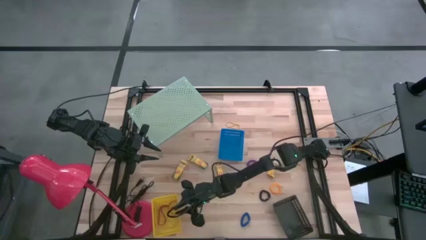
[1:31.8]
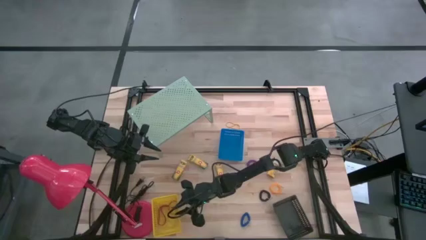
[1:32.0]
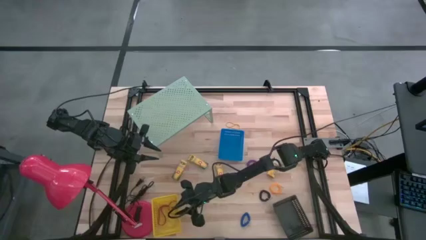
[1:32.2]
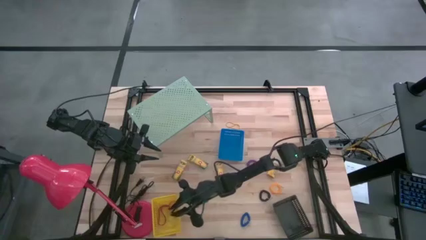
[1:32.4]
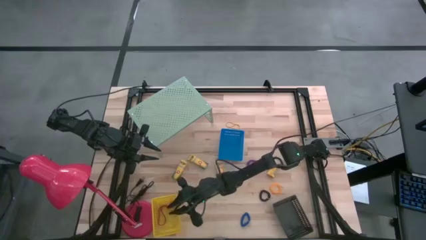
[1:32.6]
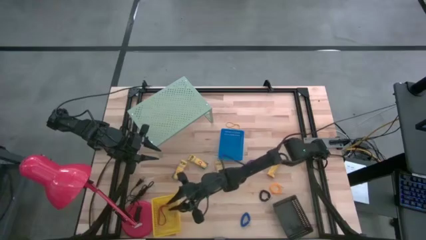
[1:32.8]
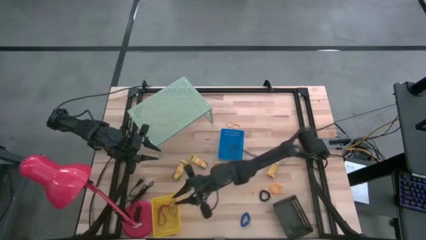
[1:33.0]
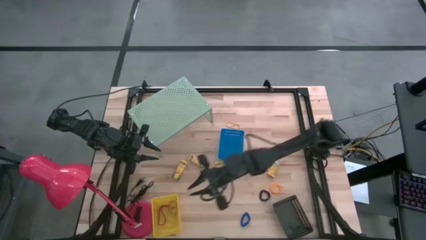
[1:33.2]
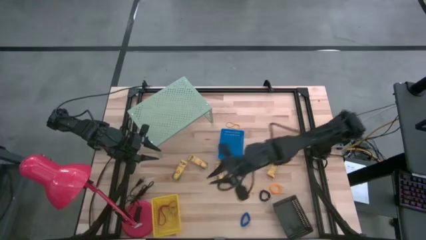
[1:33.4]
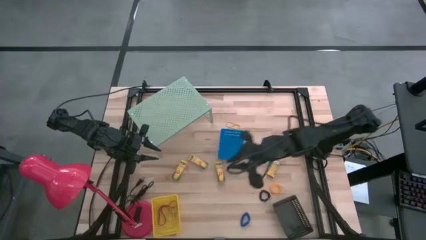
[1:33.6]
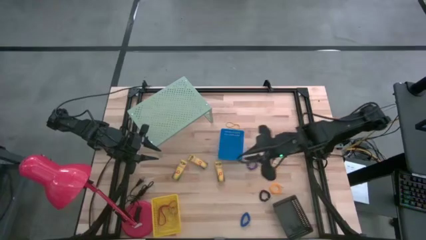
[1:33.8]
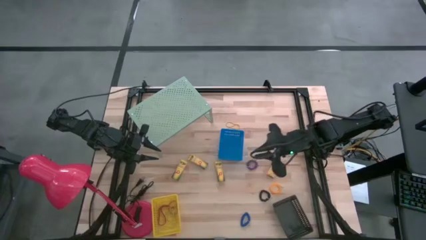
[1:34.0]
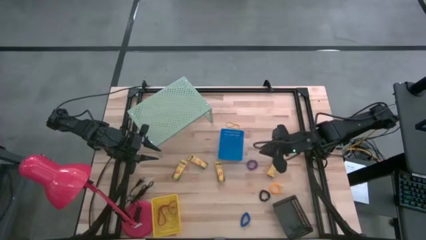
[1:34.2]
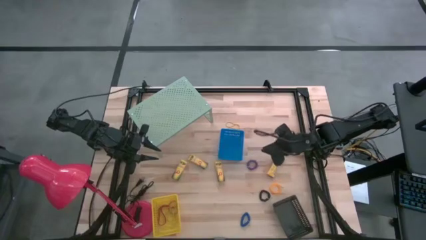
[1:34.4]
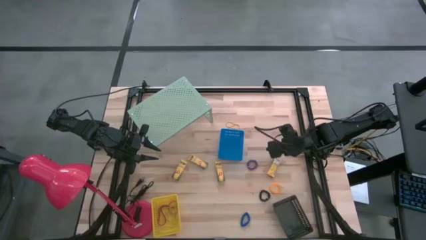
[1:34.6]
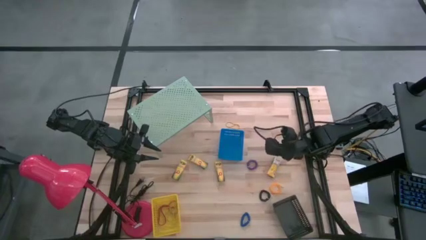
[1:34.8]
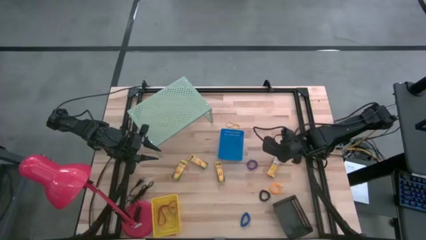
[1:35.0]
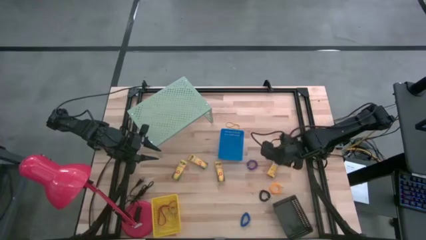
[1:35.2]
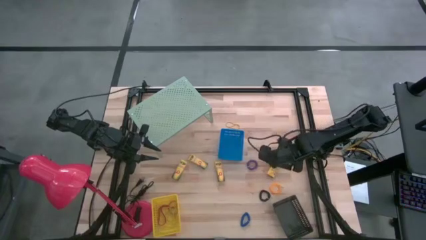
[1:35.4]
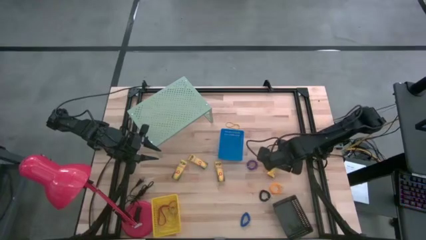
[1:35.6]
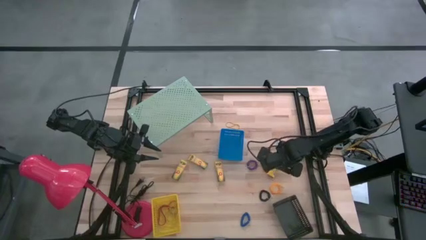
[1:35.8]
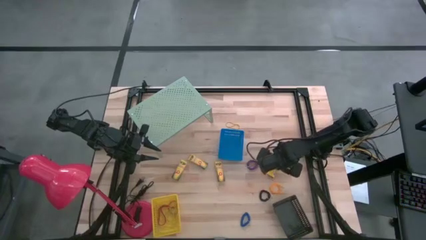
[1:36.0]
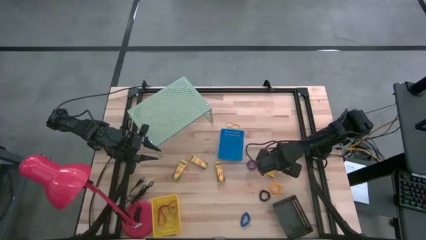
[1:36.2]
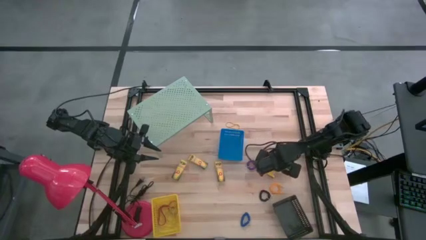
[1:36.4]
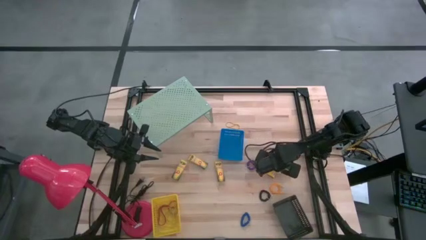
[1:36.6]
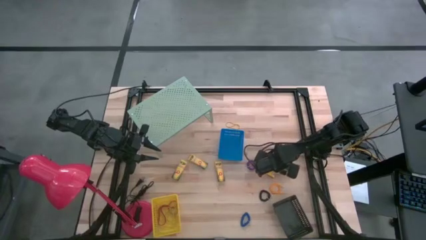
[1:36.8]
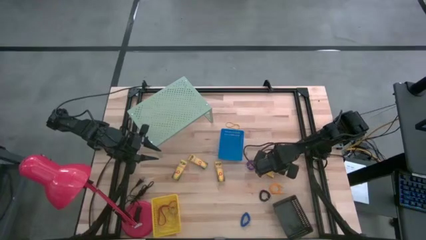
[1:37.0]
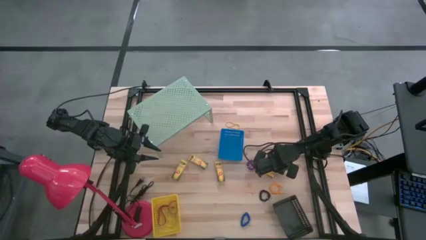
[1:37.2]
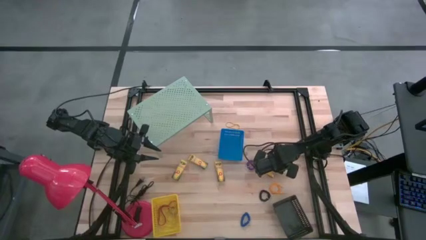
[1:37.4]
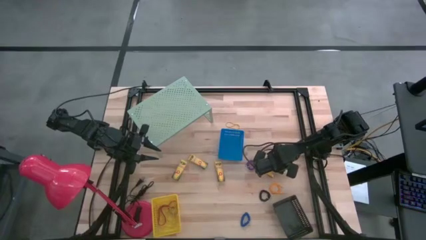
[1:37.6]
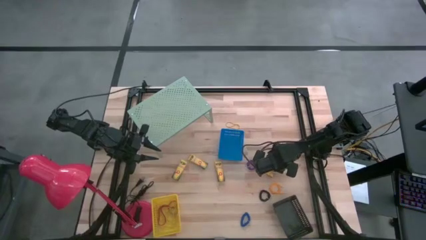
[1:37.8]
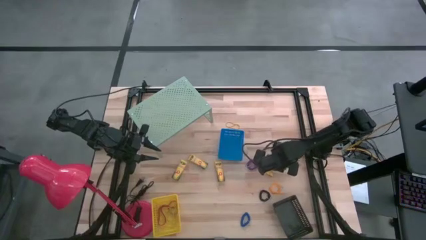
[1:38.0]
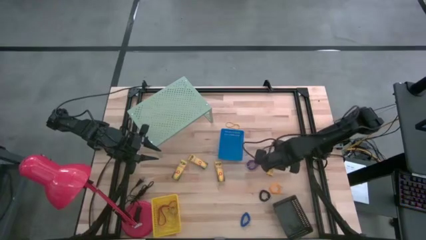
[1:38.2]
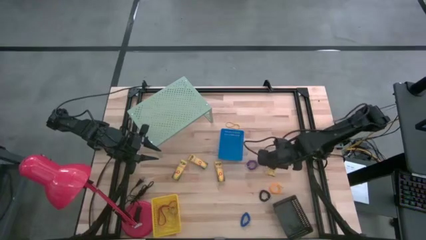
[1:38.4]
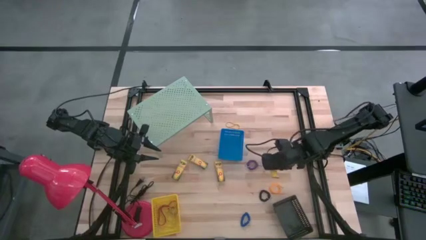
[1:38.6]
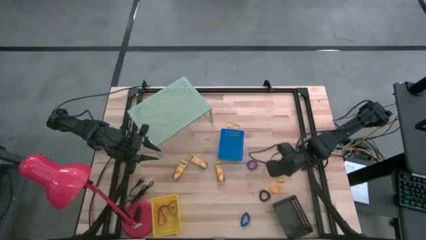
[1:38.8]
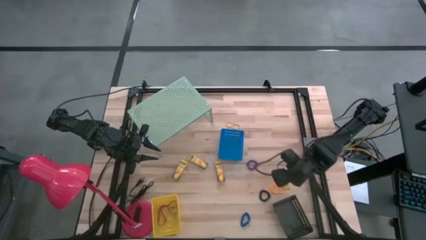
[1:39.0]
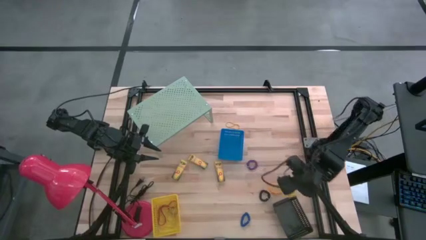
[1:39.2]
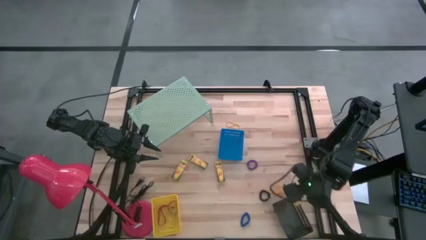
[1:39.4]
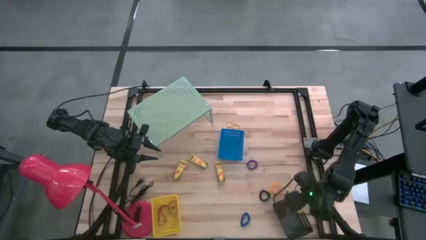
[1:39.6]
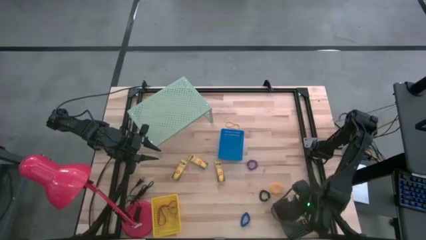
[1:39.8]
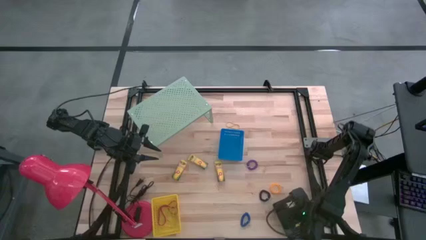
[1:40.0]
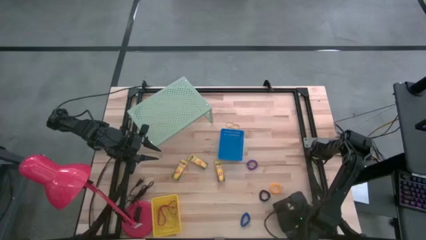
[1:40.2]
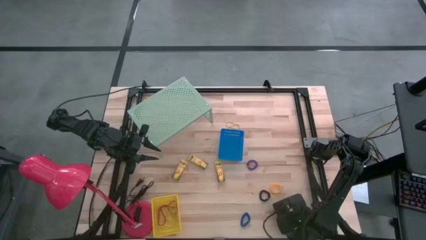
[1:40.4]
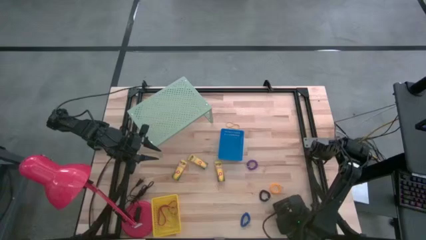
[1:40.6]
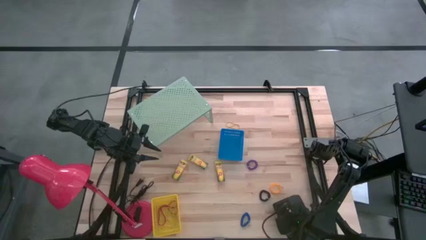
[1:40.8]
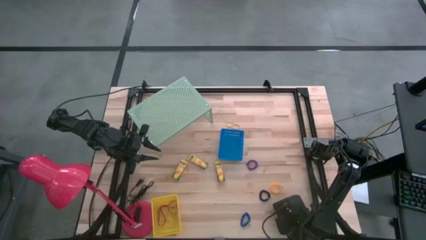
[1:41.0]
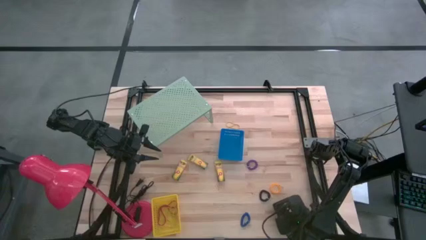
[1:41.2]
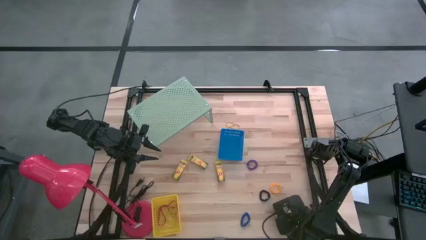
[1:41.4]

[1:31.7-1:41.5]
Task: Pick & Place Office Desk Supplies
Put the crayon box into the black basket

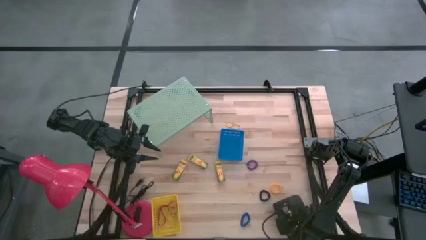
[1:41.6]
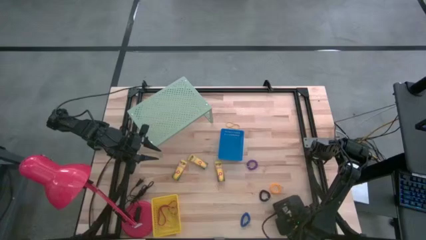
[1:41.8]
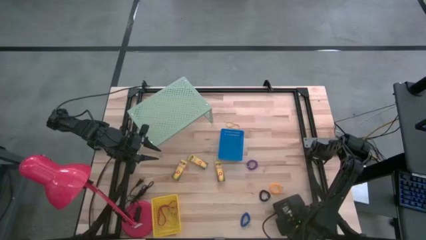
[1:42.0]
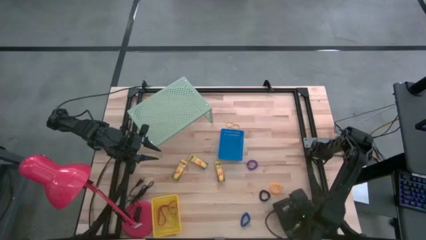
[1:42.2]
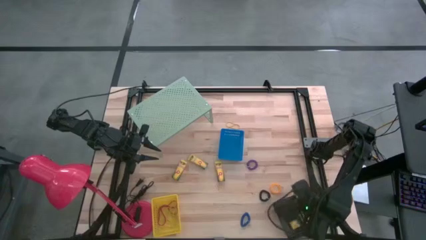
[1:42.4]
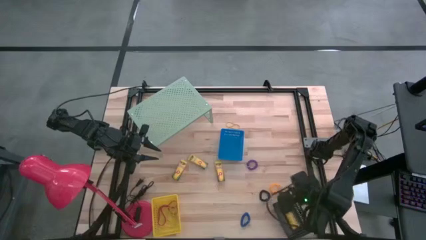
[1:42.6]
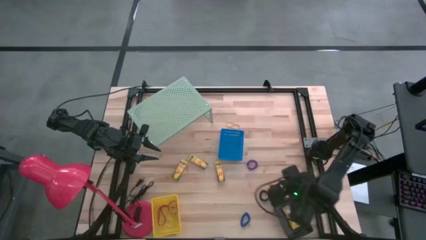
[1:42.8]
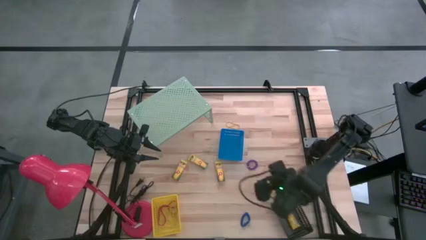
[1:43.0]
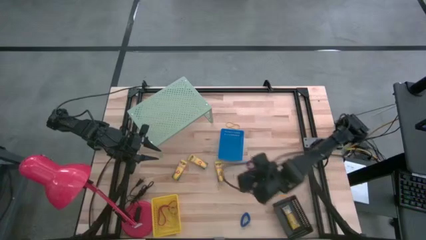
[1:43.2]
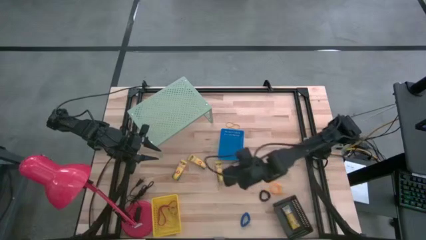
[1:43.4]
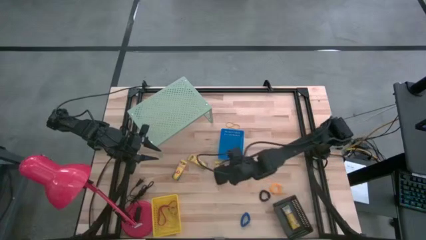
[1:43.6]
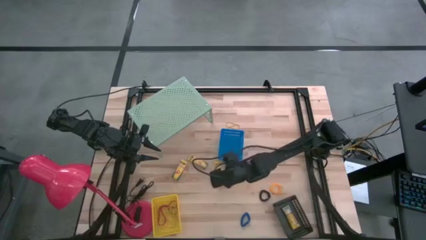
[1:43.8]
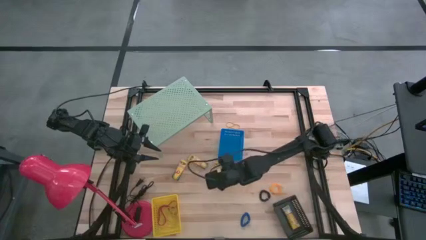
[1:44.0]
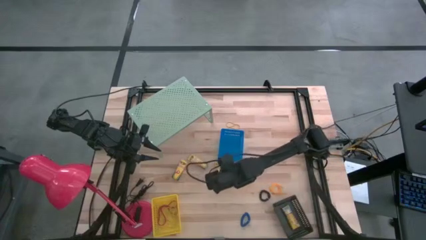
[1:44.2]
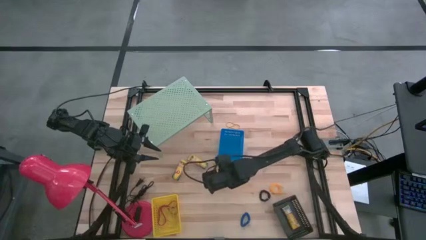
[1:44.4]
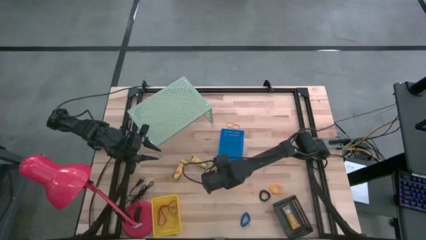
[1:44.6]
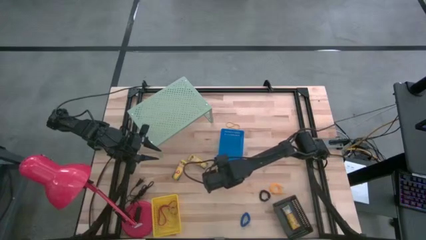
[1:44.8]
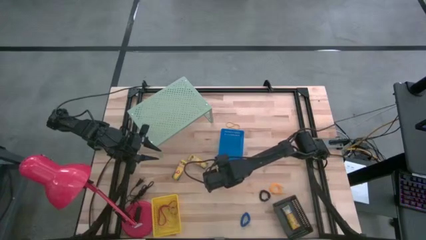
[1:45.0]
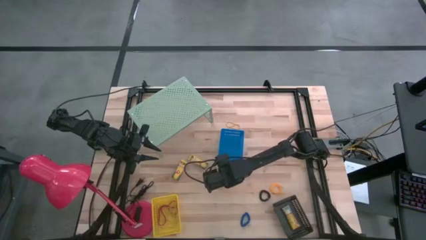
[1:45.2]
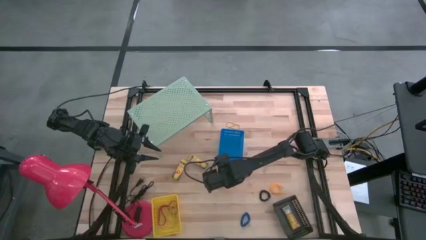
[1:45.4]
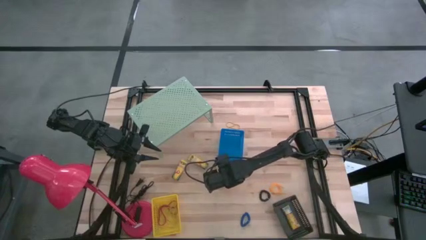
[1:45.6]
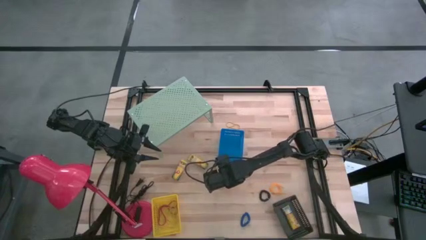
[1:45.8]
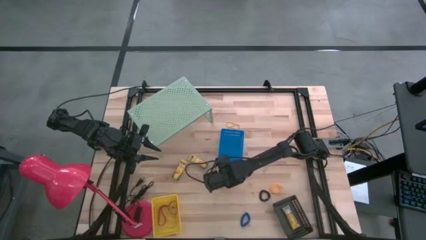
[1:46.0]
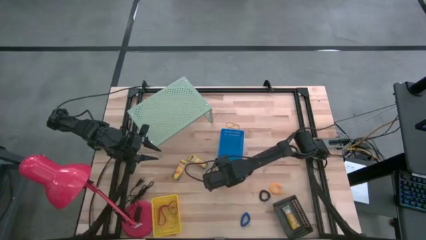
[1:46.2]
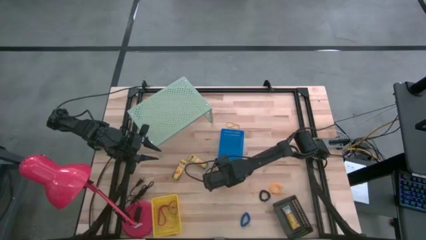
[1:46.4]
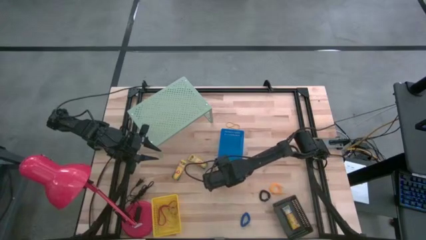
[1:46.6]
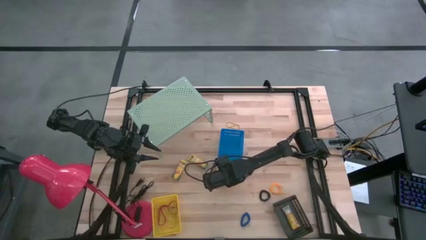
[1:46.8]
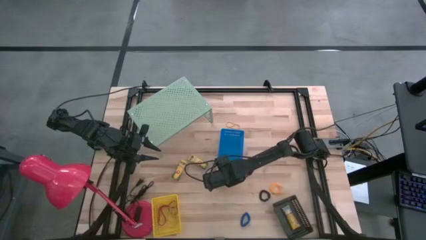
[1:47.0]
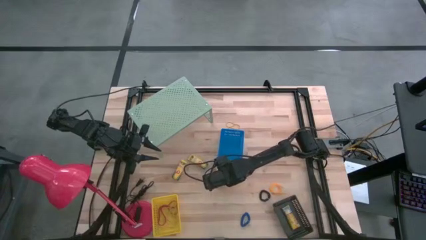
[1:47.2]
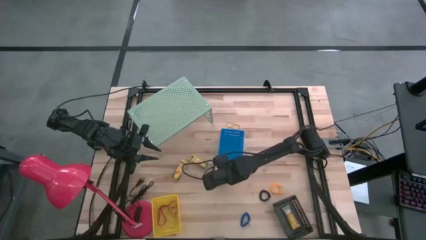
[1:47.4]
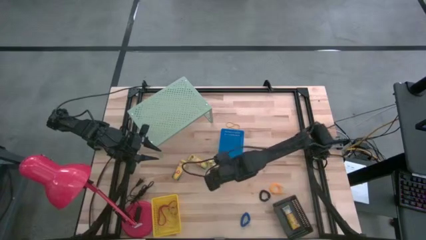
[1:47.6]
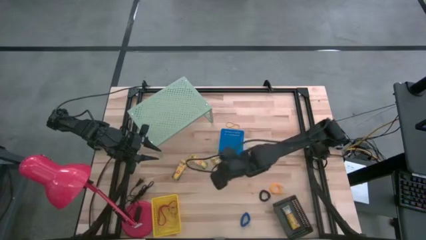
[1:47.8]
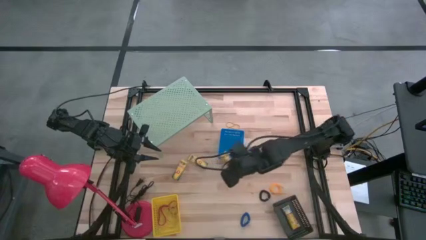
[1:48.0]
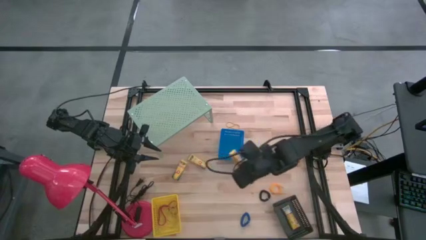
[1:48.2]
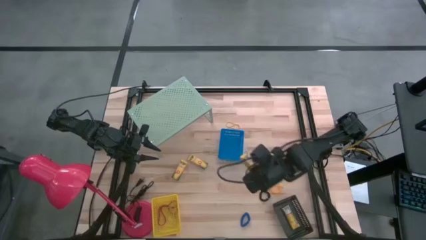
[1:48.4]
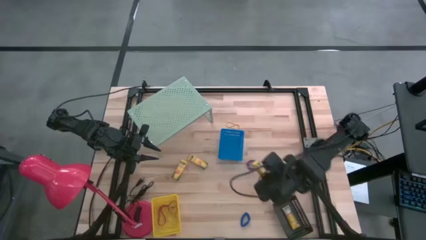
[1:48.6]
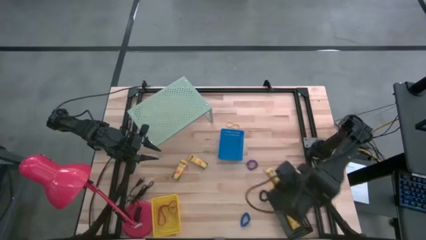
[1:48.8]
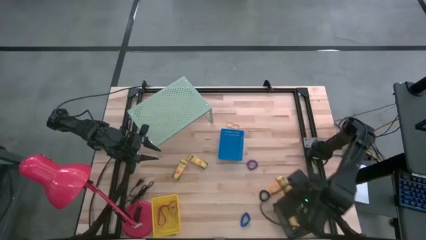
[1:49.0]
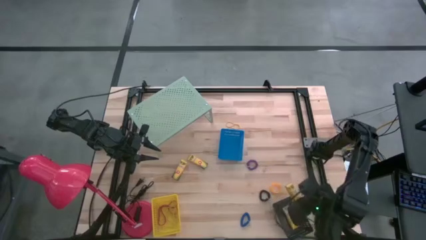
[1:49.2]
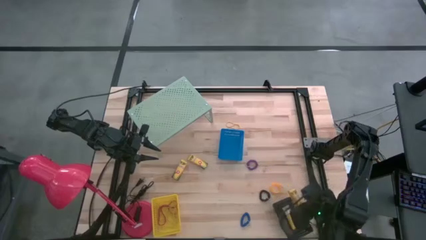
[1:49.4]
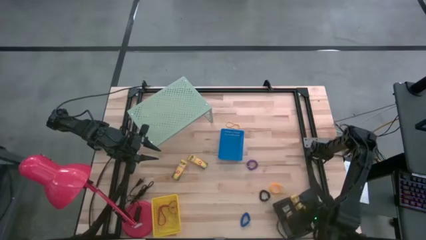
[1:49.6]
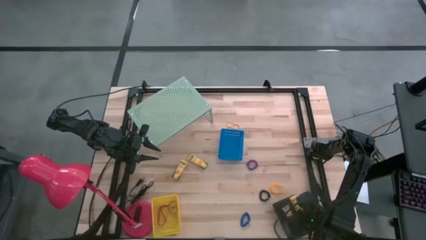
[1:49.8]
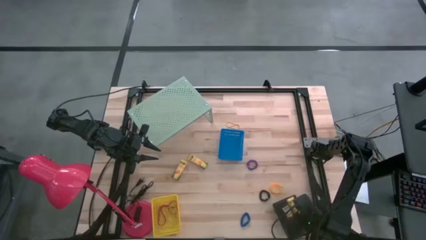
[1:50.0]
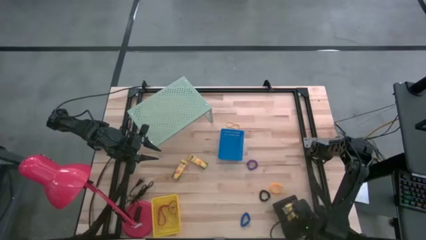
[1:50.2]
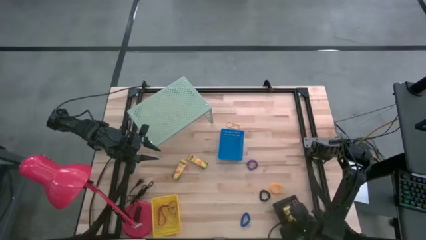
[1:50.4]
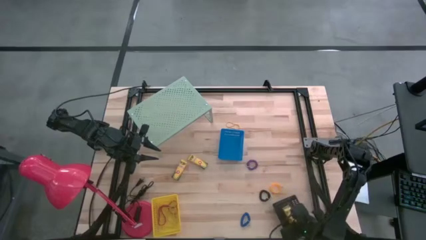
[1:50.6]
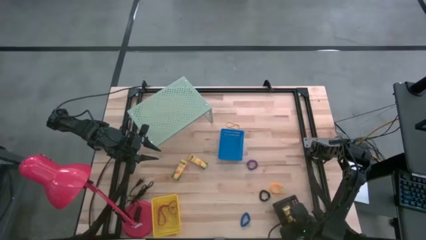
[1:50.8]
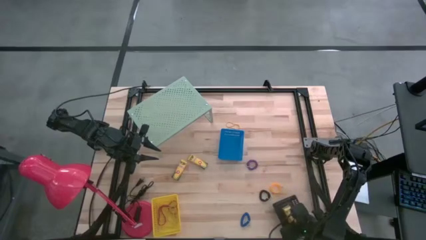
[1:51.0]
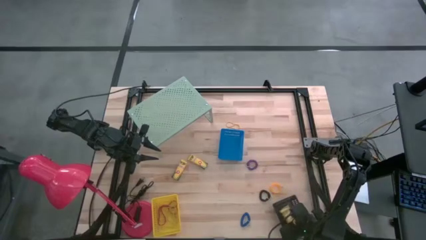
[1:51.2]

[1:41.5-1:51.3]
Put the crayon box into the black basket
